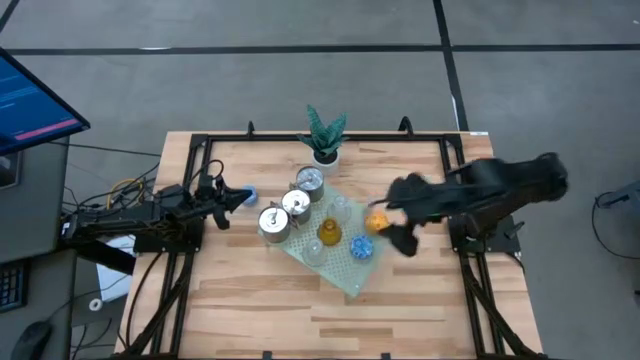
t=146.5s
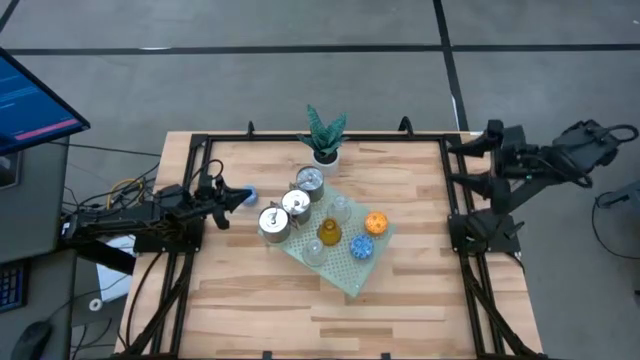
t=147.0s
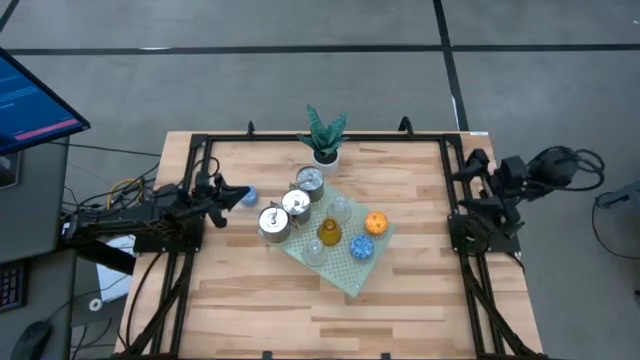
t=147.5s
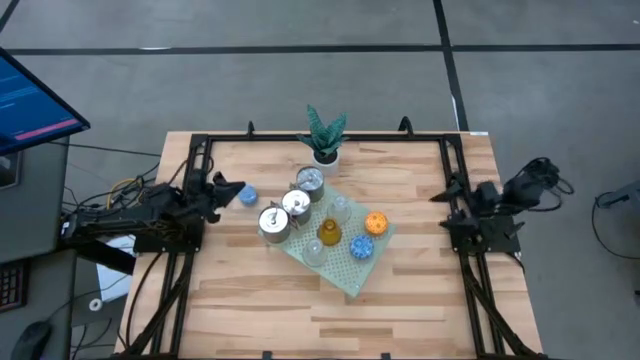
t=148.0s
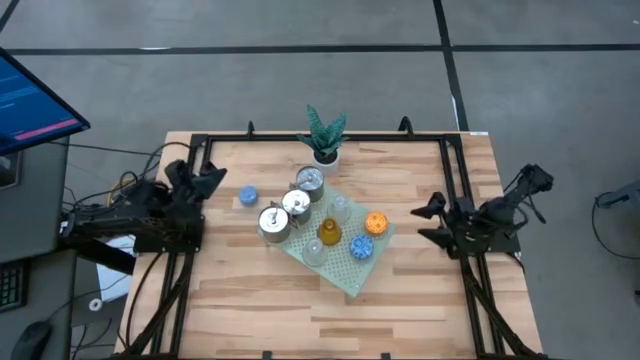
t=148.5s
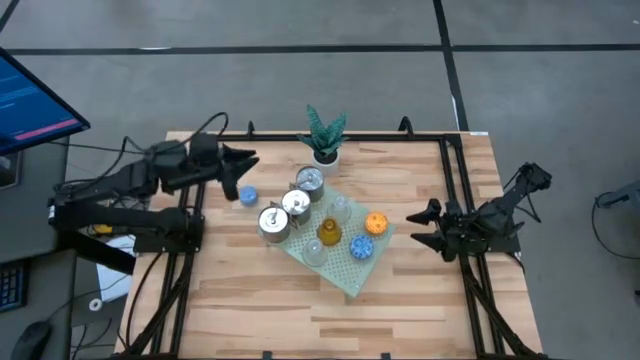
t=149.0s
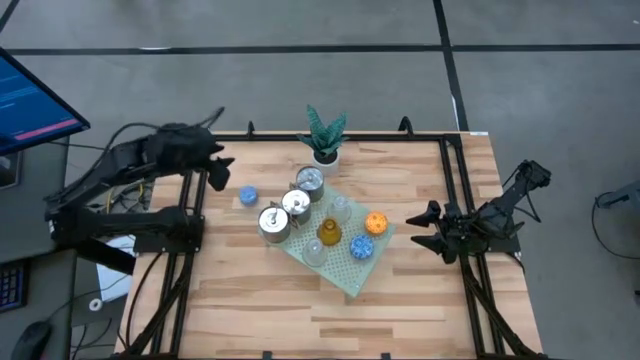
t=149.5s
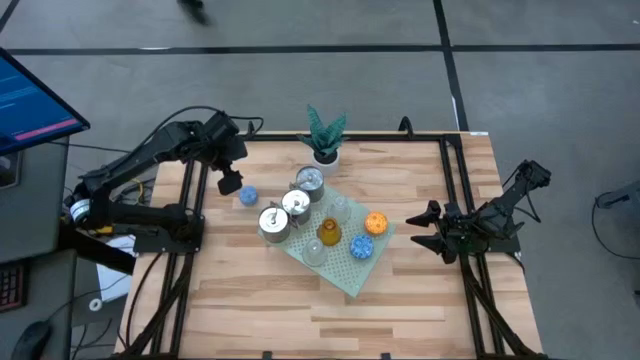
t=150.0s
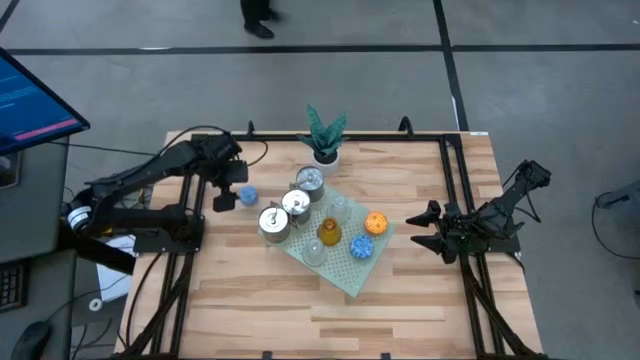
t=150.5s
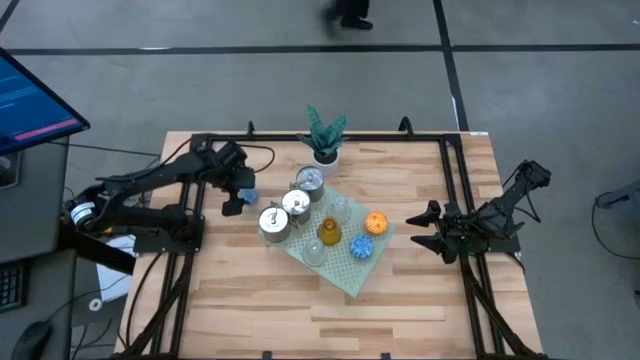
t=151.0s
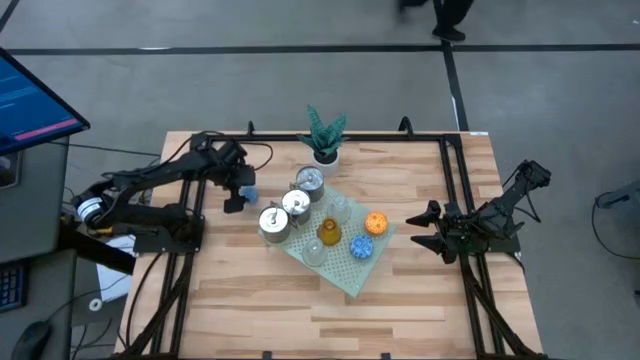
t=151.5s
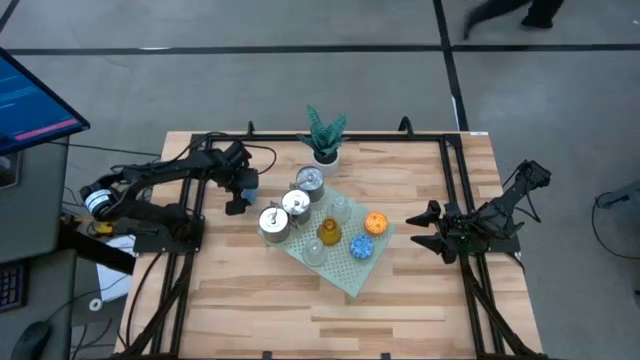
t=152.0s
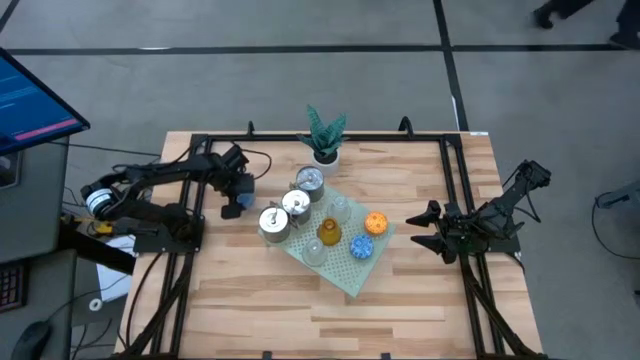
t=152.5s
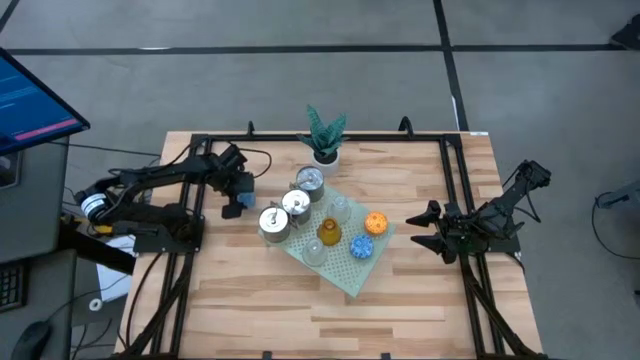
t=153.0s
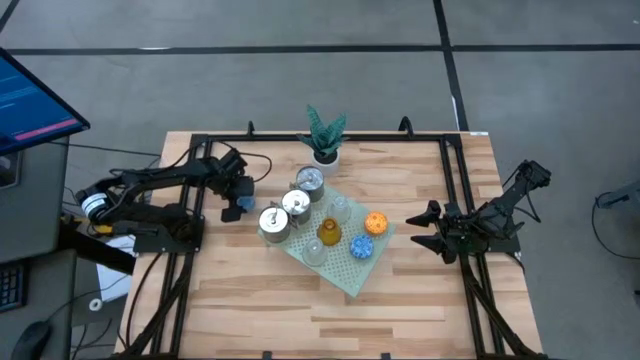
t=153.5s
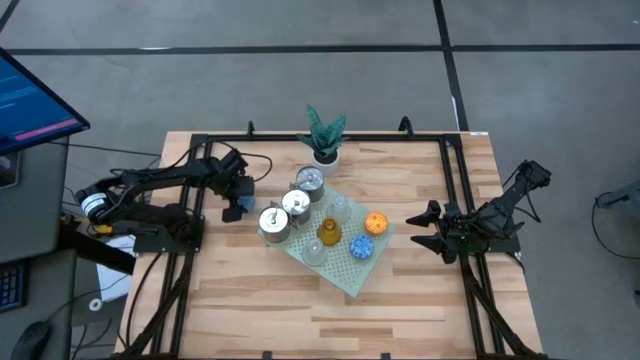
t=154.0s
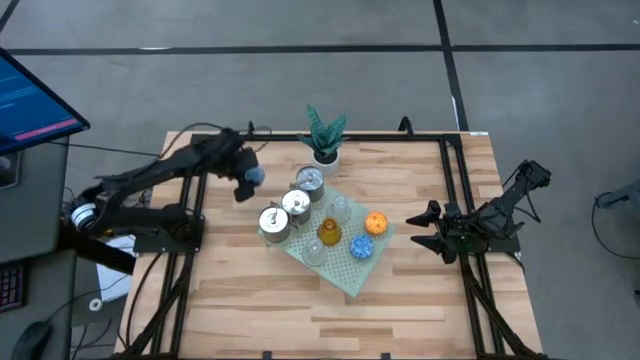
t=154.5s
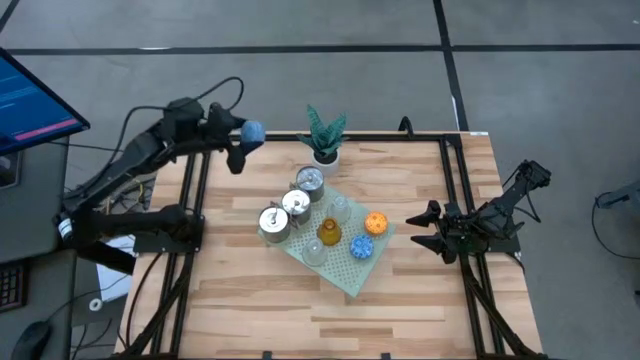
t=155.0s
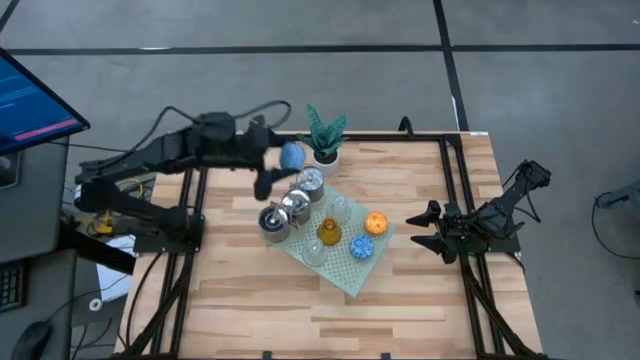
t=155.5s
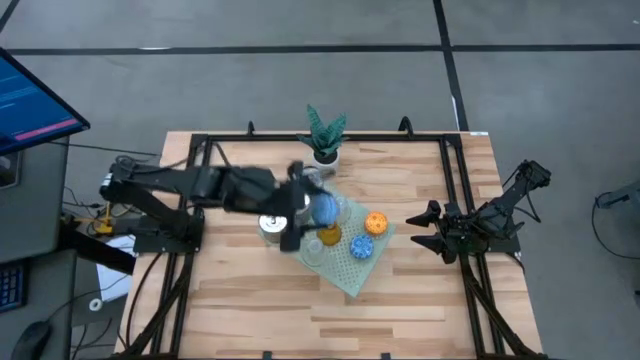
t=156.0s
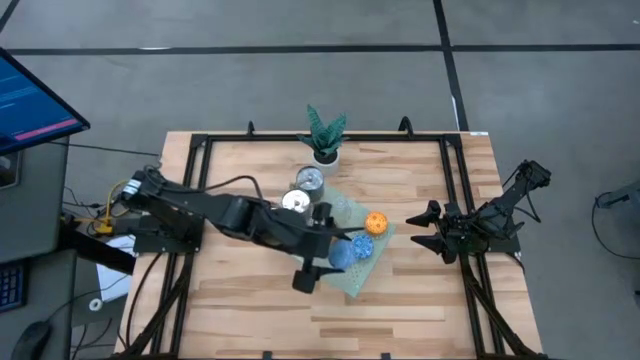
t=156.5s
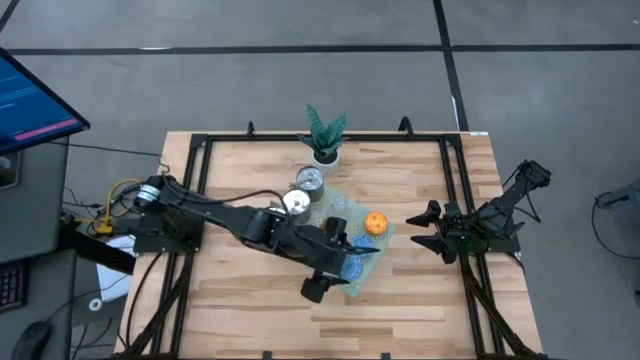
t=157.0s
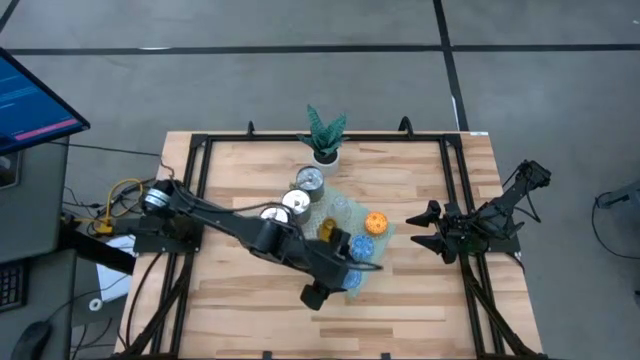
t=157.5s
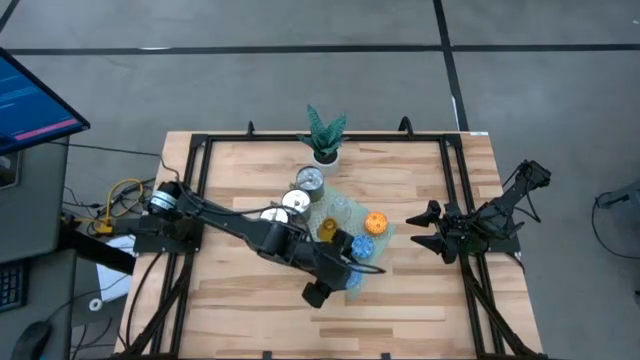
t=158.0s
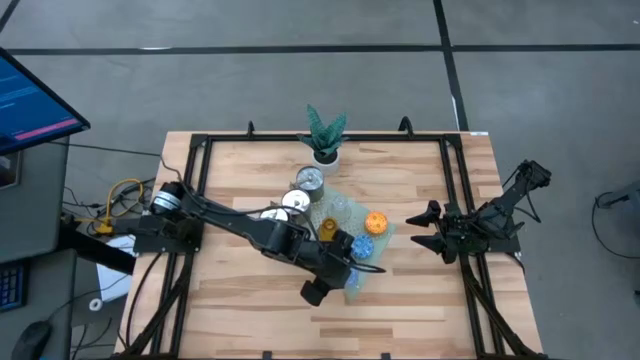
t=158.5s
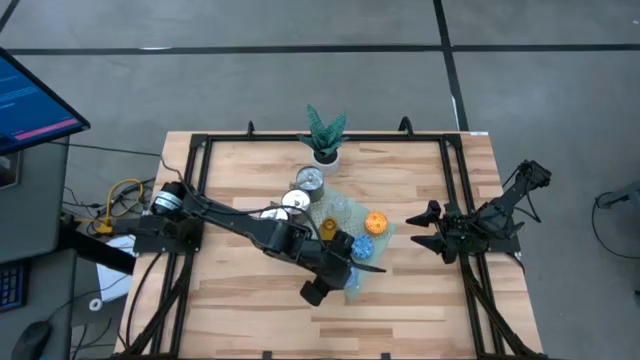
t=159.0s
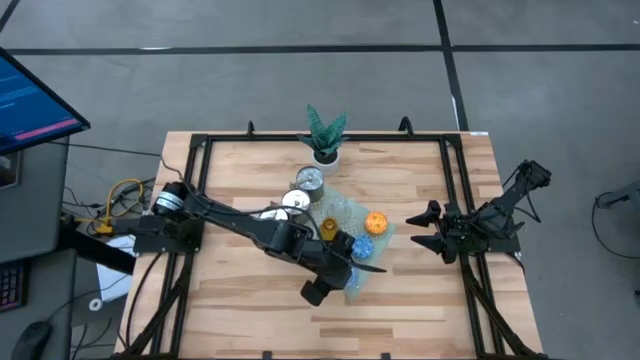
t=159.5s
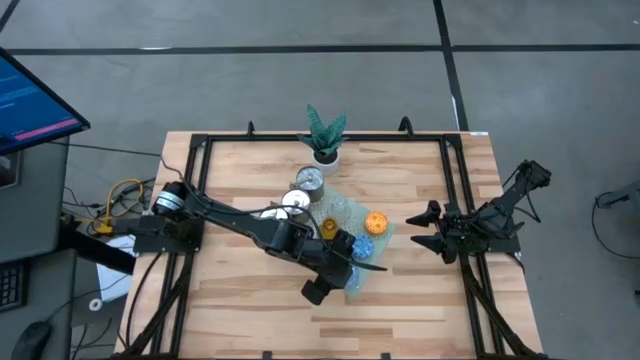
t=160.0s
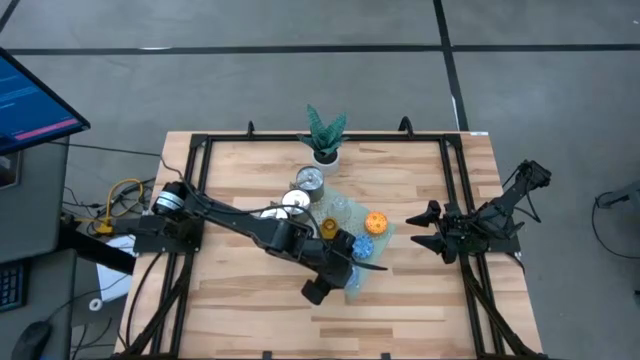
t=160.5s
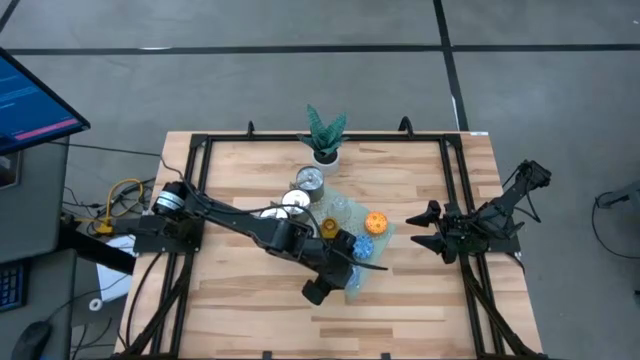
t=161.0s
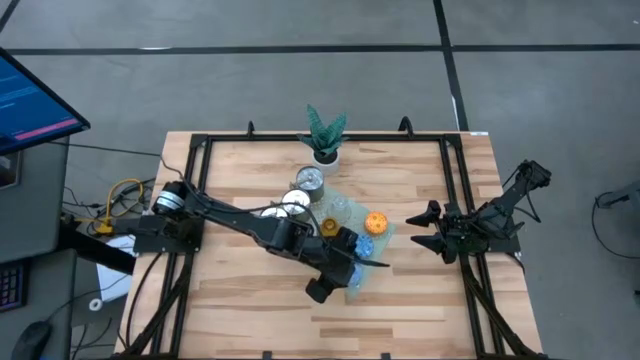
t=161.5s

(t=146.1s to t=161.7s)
Task: Pick & Place candle stick holders
Put the light blue scented candle on the shelf

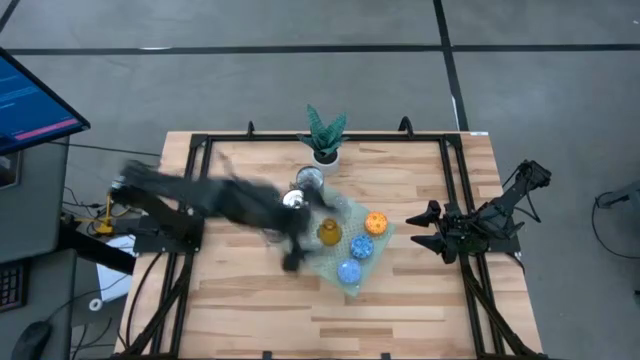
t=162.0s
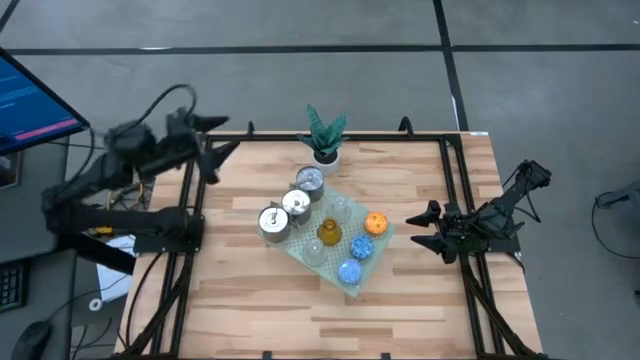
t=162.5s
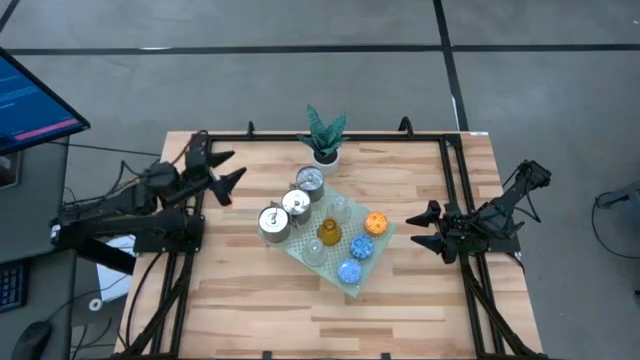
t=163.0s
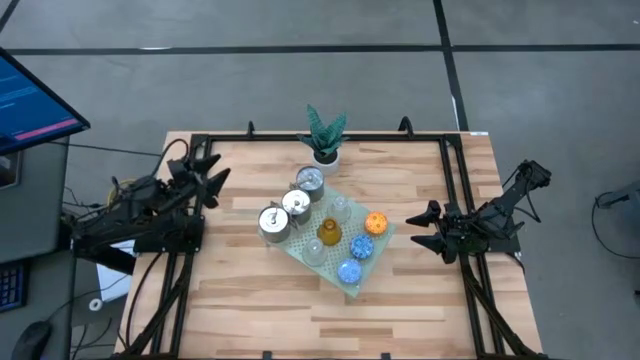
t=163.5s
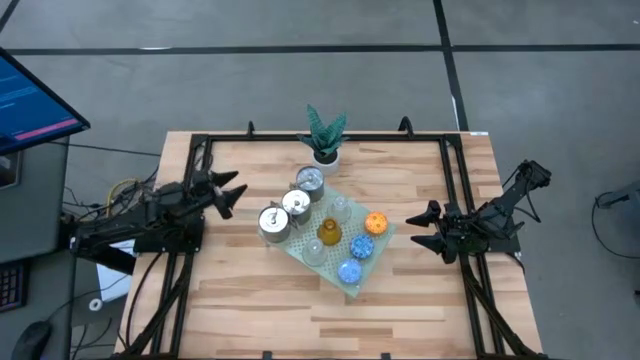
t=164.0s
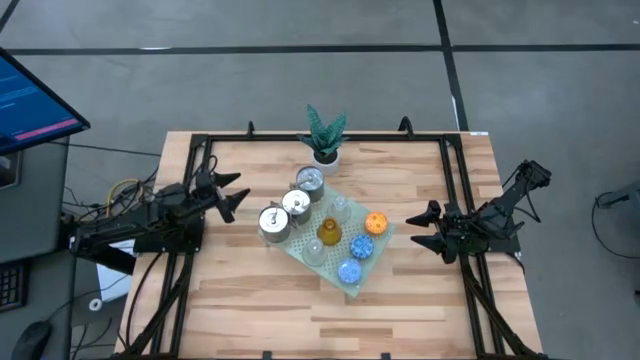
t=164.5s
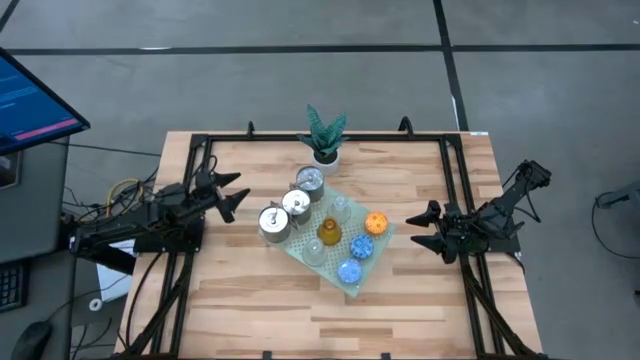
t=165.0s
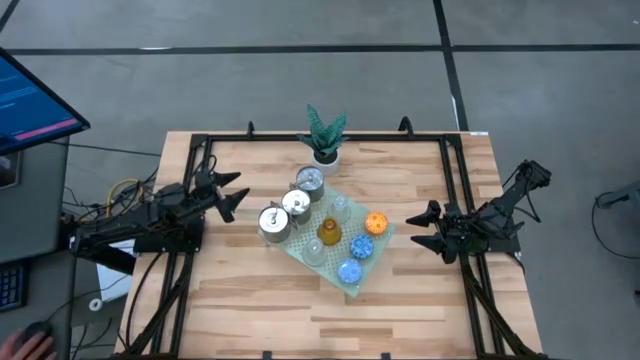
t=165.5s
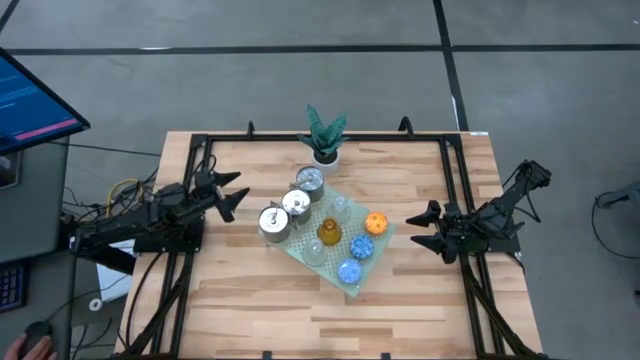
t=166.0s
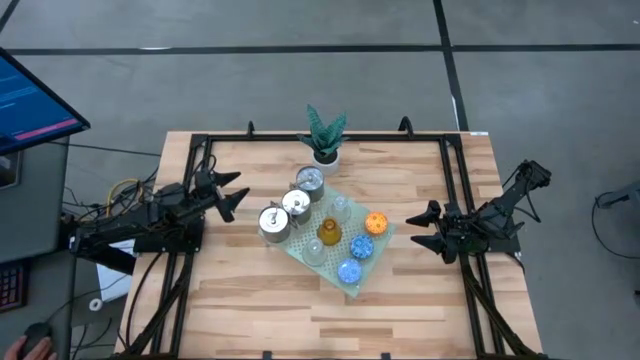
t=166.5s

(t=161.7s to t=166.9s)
Return to Home Position

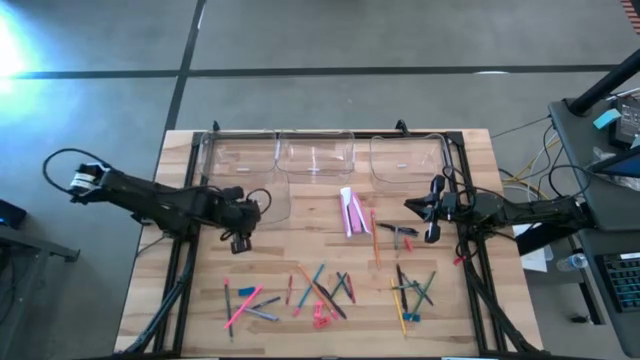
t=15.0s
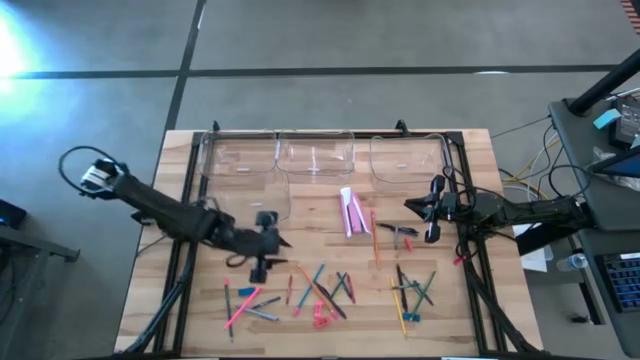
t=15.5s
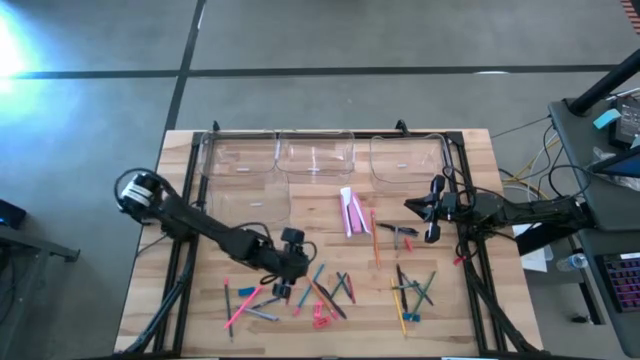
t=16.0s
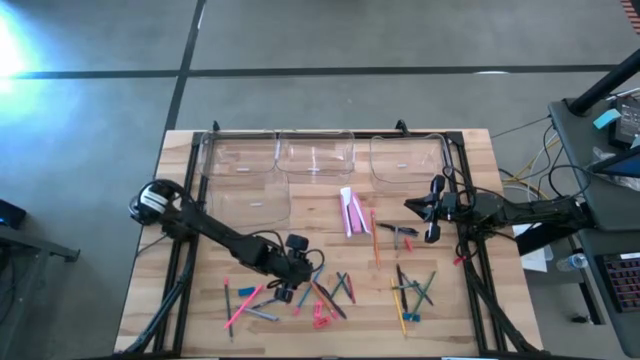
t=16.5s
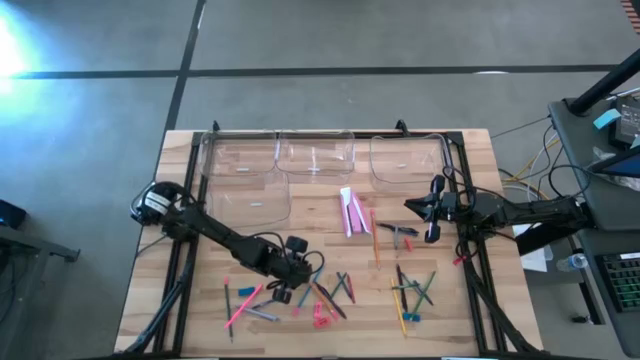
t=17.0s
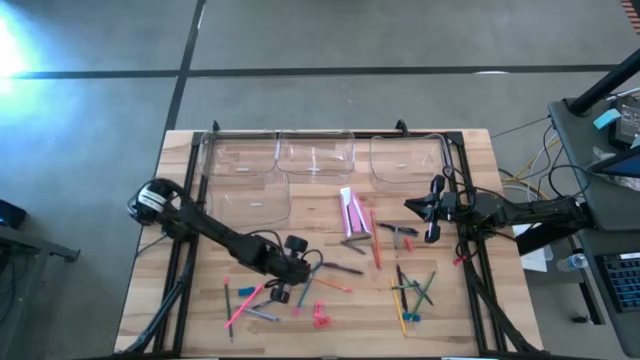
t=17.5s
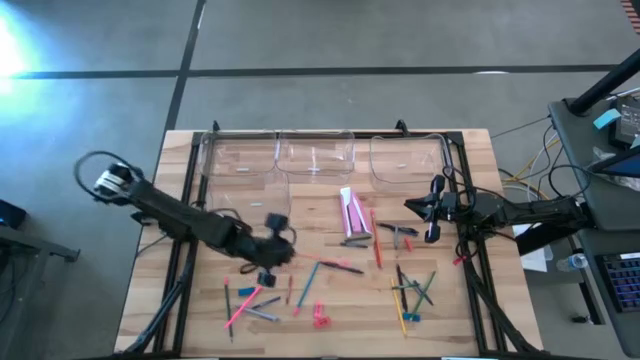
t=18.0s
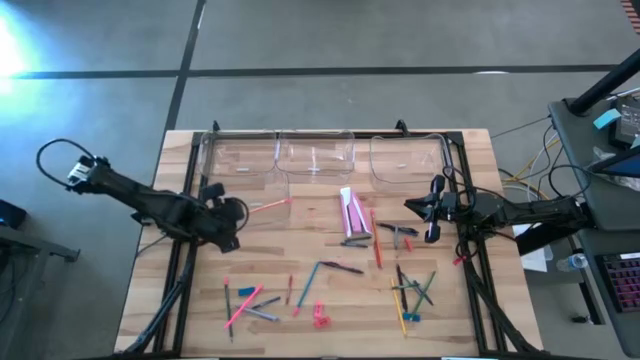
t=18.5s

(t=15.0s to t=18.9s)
Task: Sort crayons/erasers/pens/pencils in bins
Put the orange pencil into the bottom left transparent bin
